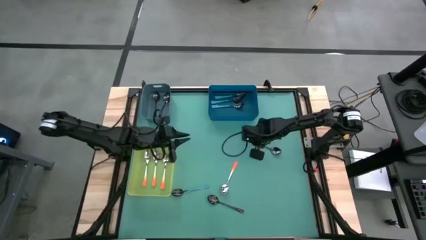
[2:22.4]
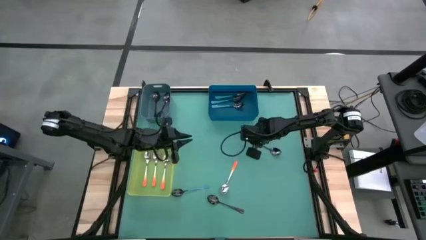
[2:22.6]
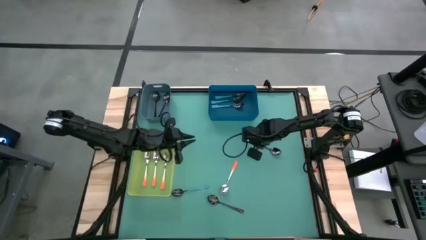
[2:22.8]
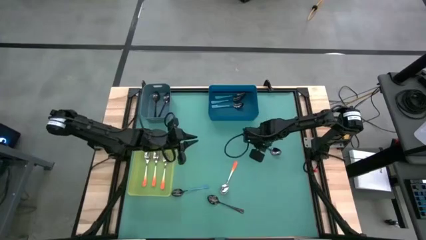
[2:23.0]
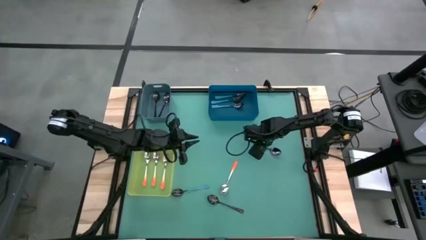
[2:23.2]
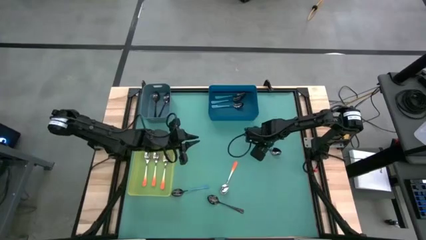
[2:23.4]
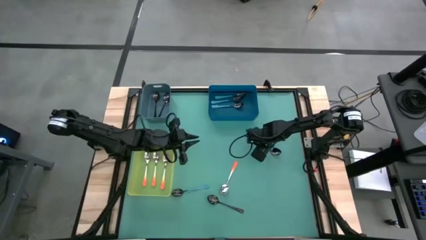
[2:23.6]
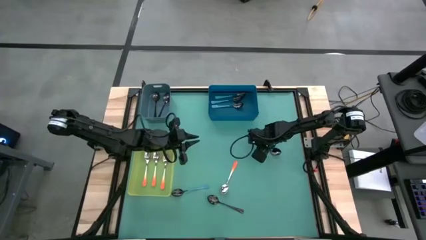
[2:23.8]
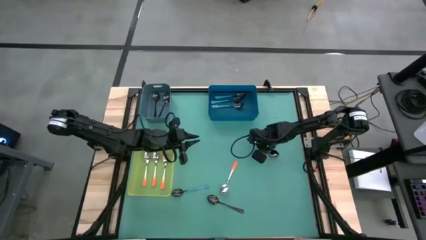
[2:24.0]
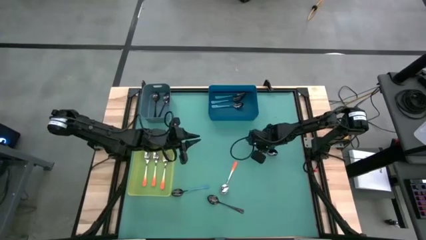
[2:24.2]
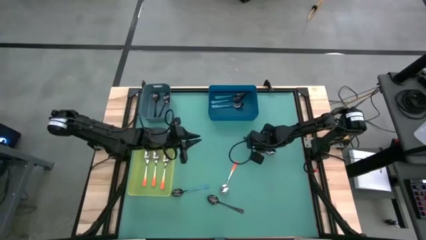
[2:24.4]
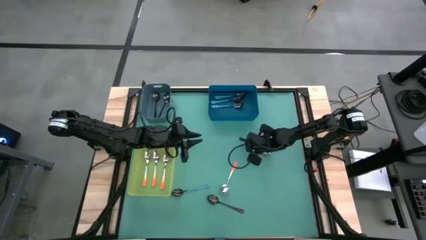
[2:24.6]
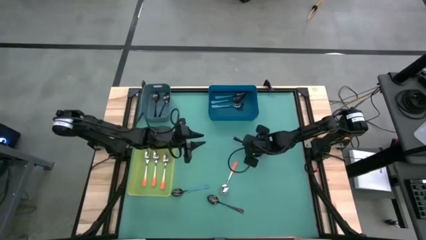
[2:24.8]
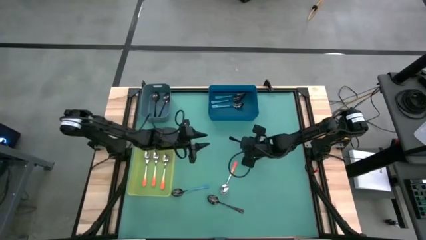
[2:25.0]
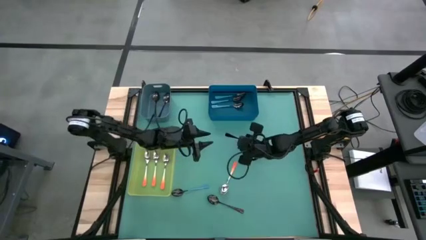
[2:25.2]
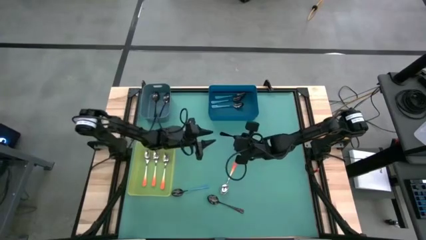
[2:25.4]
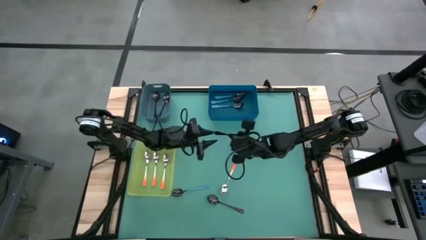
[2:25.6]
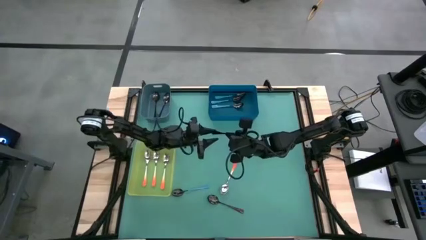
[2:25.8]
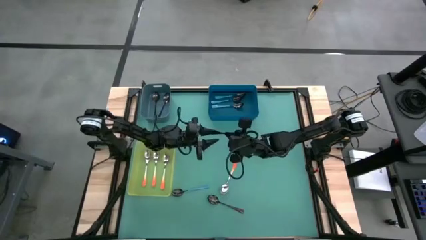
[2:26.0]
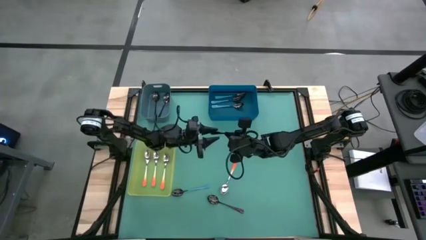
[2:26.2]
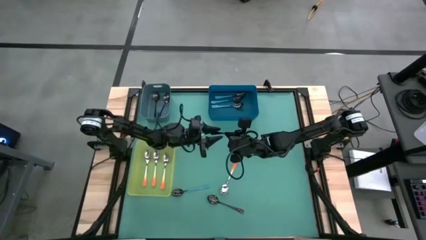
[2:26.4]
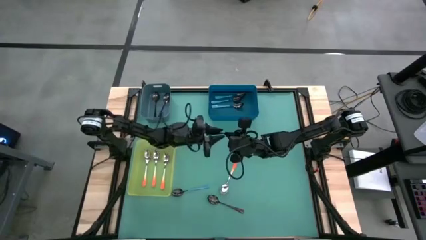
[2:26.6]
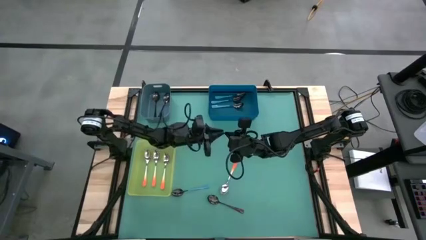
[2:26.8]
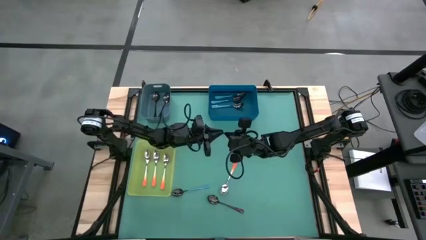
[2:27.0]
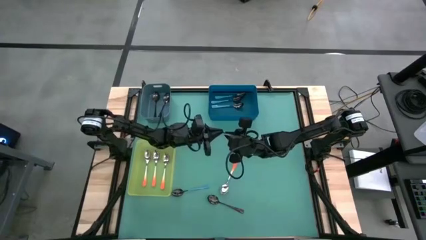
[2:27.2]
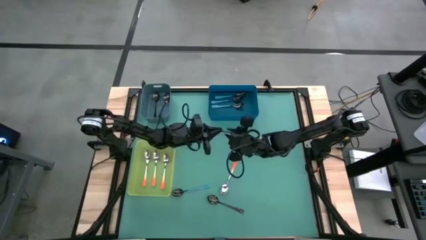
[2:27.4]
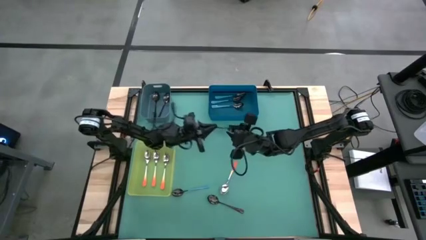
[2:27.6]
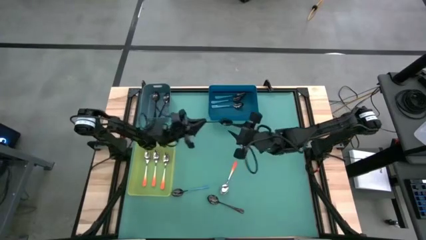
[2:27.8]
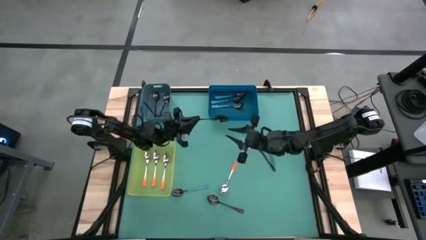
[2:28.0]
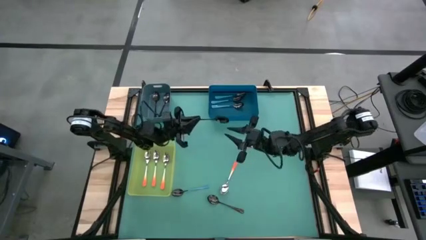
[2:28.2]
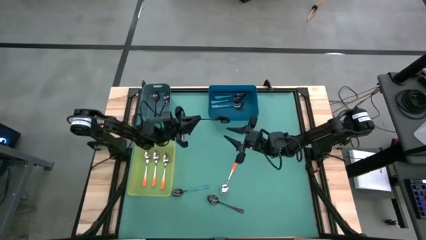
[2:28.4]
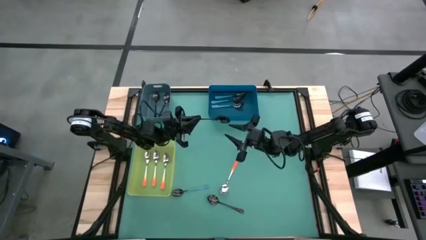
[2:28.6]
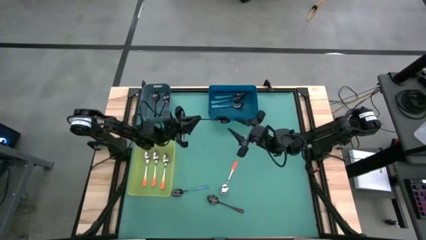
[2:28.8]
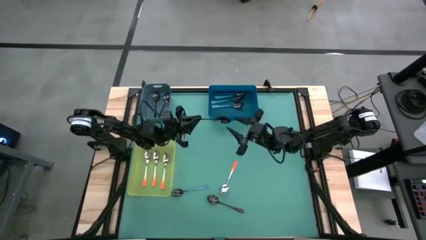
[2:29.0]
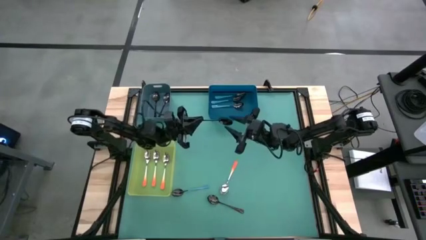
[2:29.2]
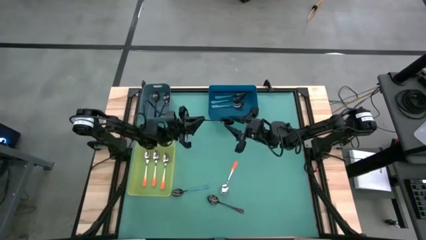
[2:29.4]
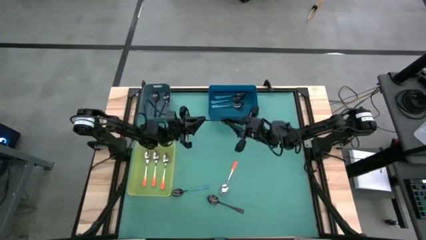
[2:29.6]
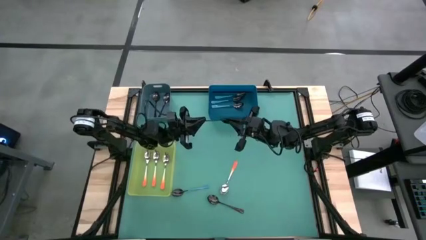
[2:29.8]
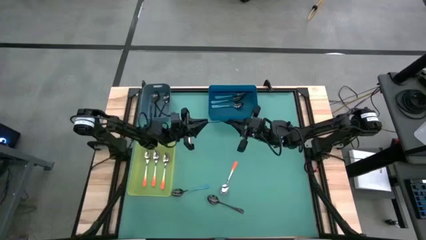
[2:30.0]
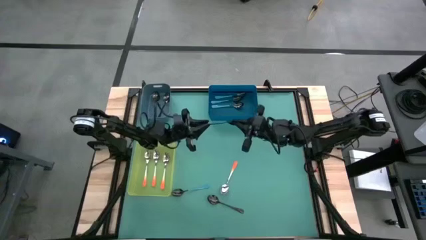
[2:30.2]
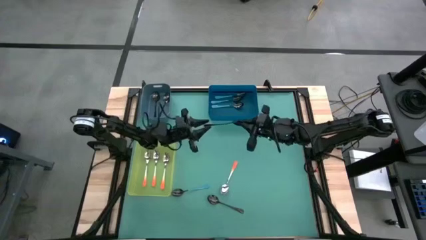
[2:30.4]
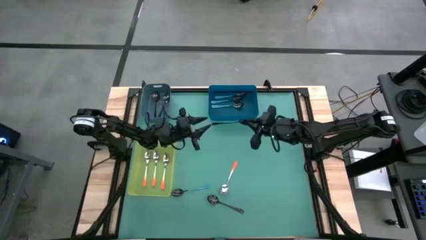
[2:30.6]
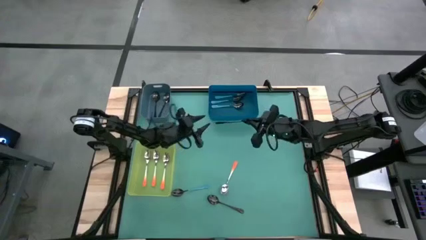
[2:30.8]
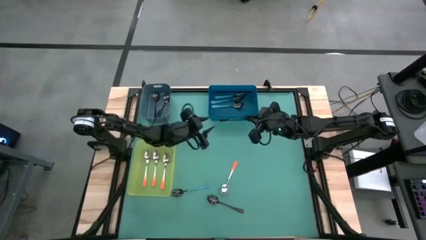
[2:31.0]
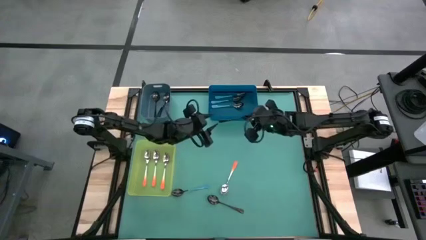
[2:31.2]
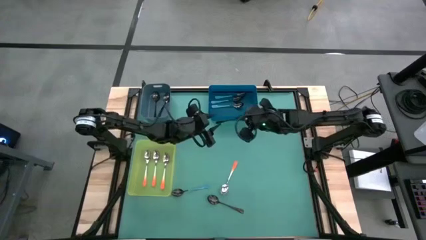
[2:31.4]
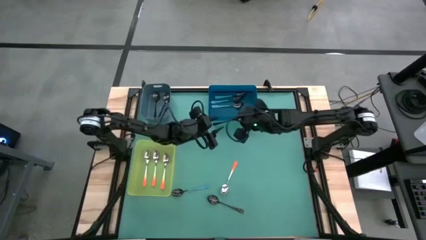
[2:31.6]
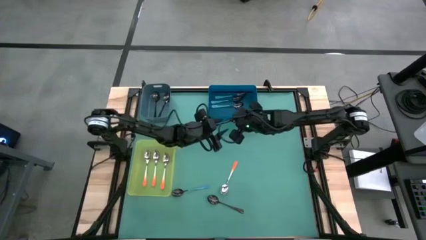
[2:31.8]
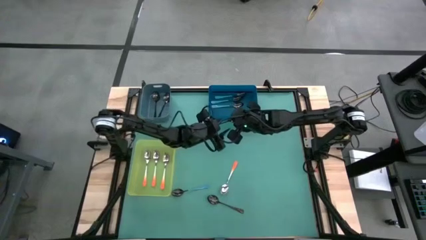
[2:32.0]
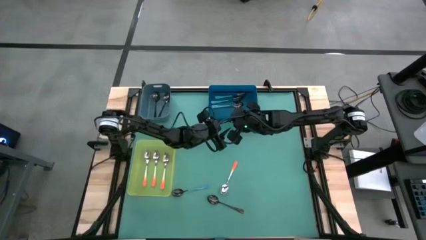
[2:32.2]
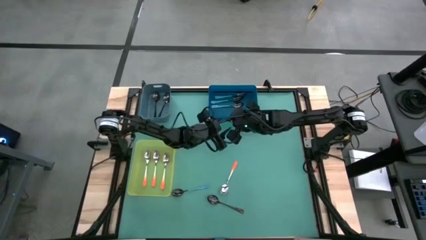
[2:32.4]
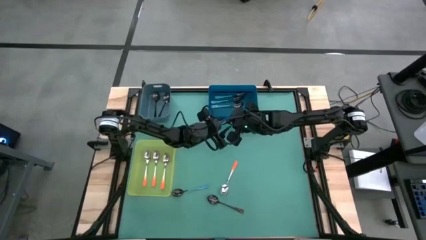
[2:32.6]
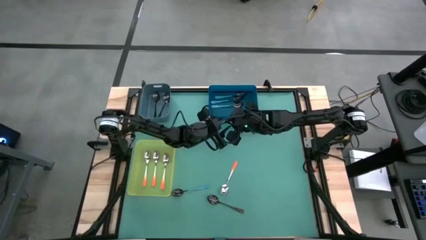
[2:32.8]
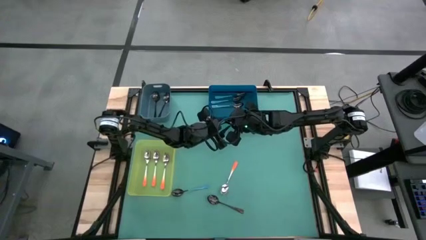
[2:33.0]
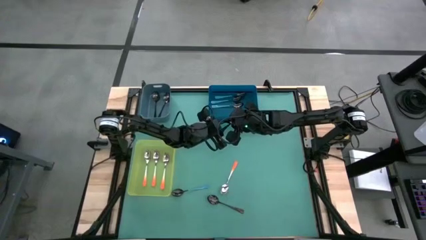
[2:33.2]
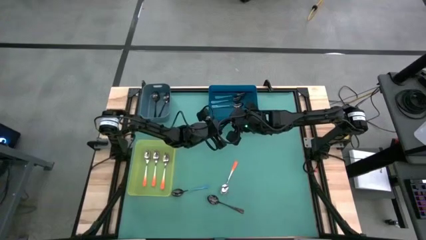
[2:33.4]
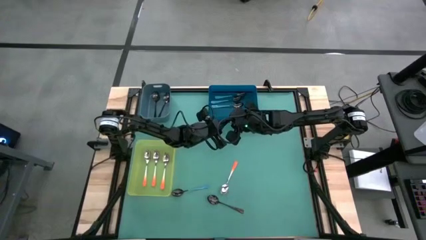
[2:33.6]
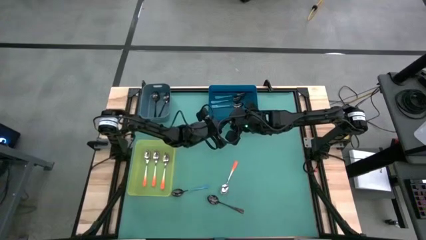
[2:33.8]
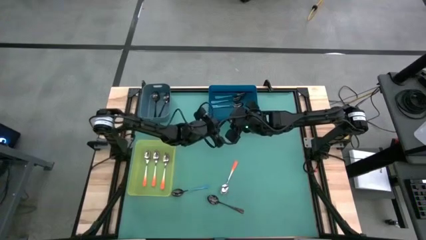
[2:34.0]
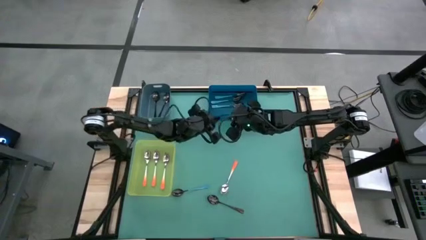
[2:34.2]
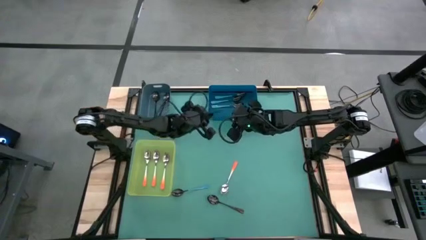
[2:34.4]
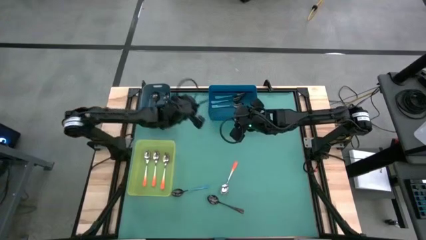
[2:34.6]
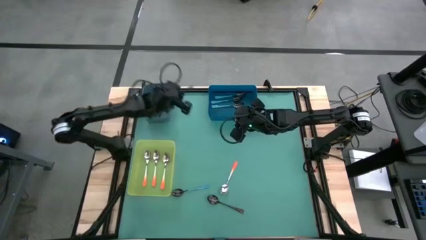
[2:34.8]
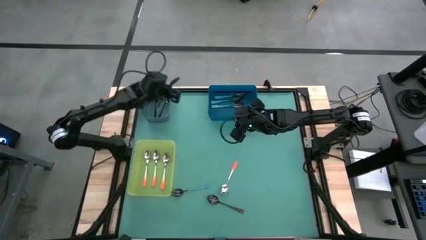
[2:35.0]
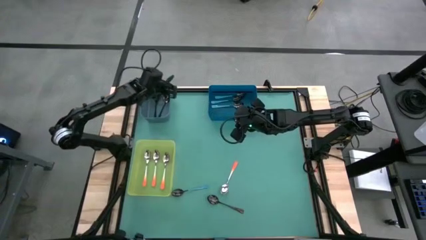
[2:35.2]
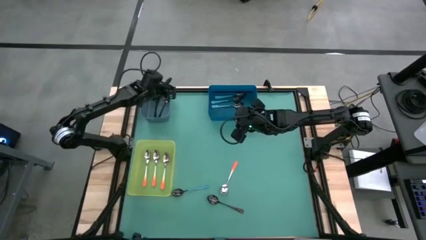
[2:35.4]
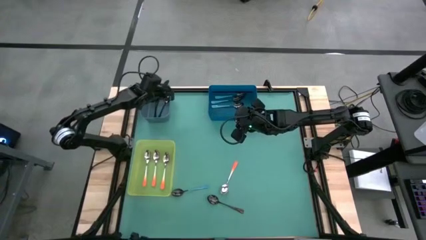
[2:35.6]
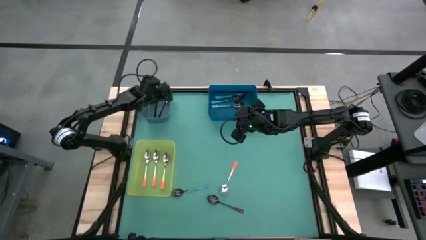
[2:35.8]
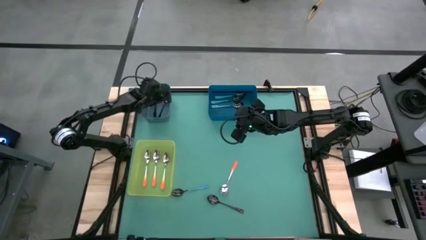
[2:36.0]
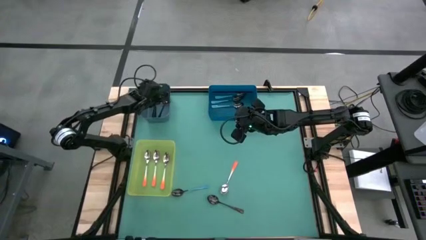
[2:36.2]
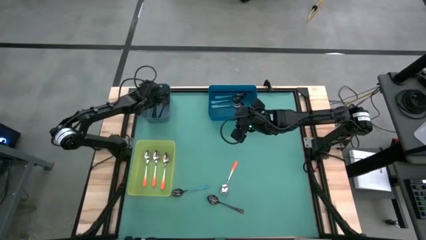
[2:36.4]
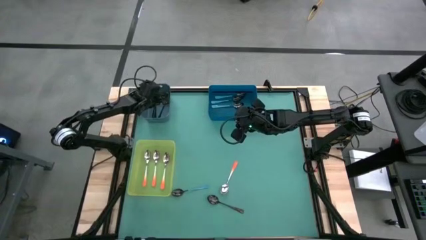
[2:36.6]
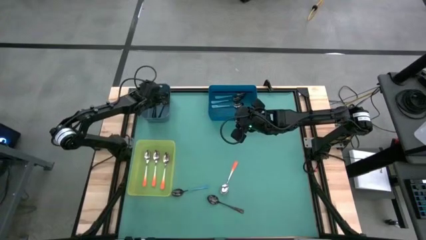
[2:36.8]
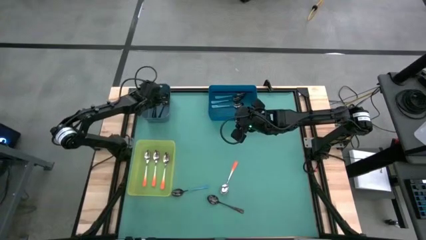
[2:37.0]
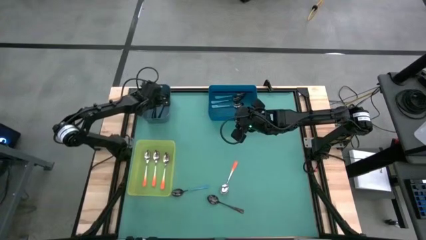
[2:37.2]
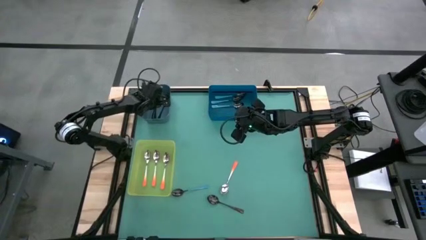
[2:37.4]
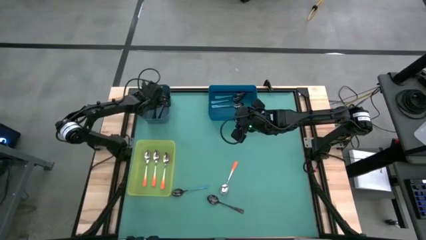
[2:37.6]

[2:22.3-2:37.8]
Task: Sort silverware by color (type)
Put the black spoon into the blue bin
